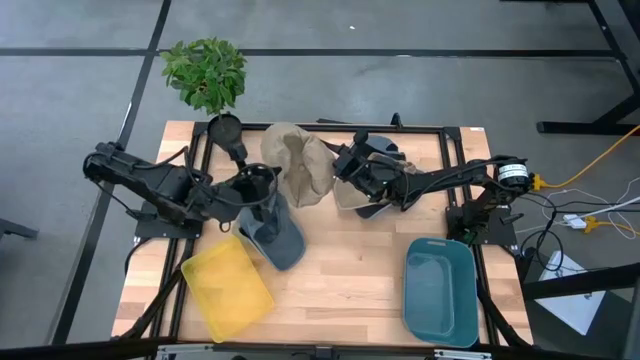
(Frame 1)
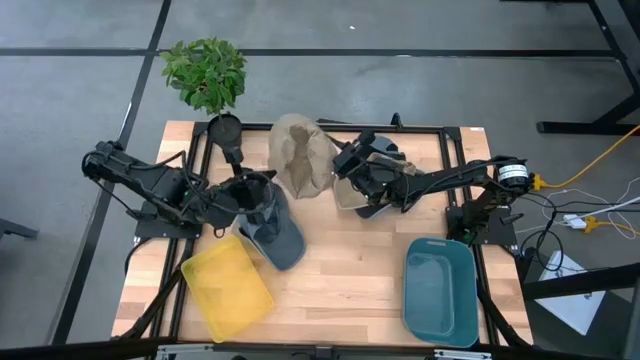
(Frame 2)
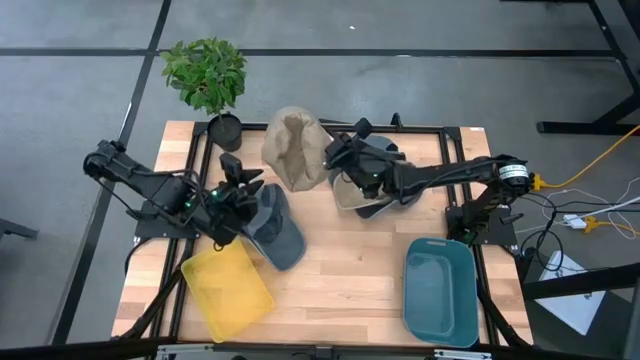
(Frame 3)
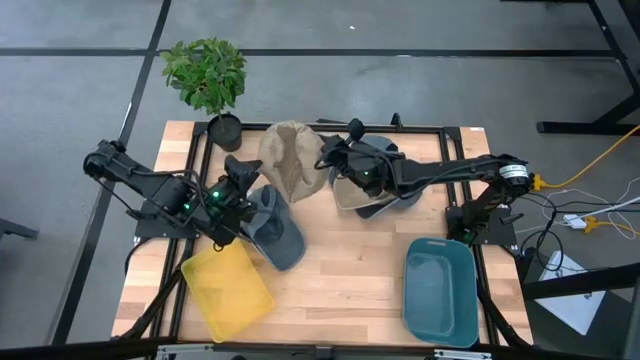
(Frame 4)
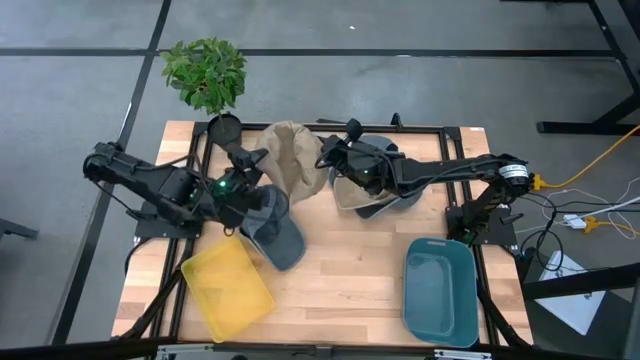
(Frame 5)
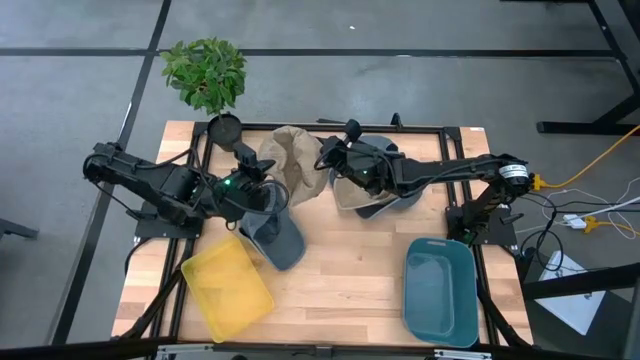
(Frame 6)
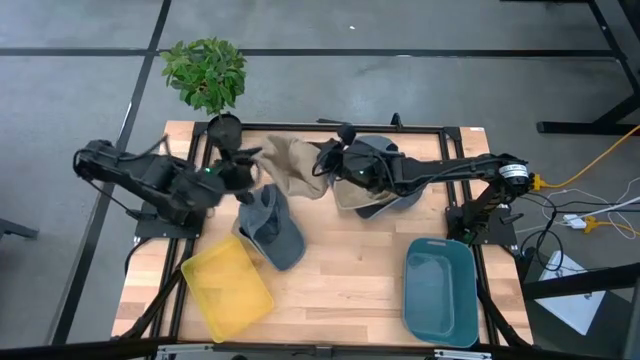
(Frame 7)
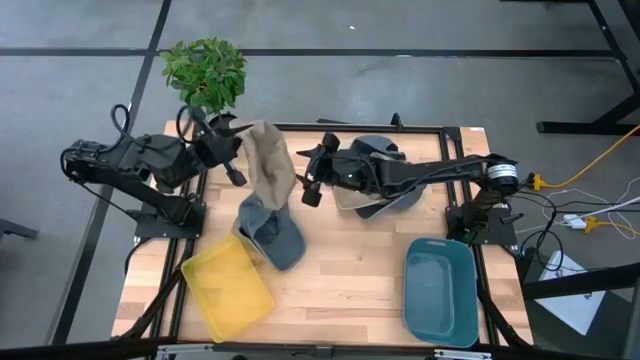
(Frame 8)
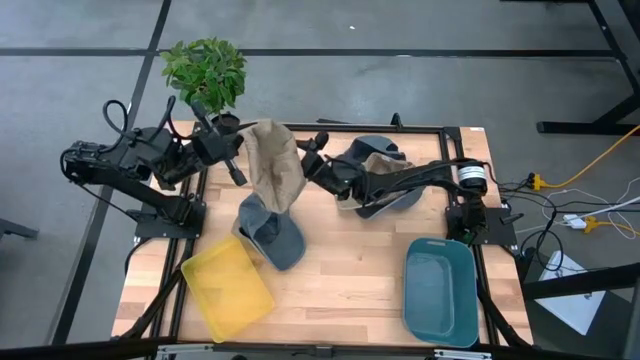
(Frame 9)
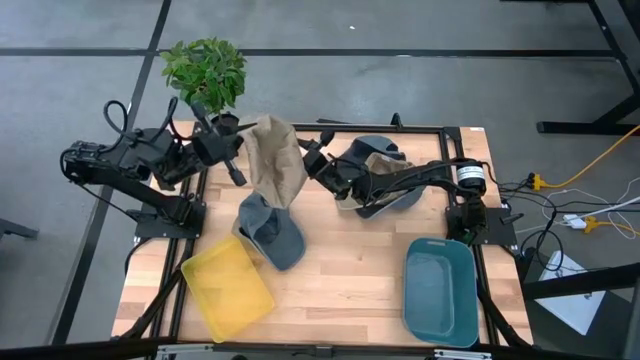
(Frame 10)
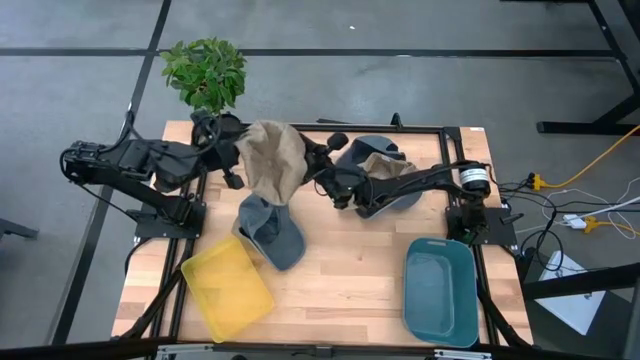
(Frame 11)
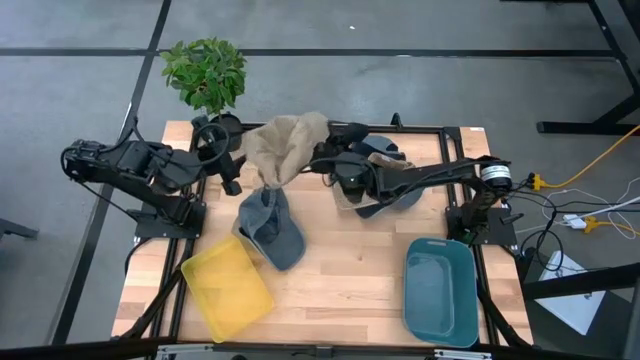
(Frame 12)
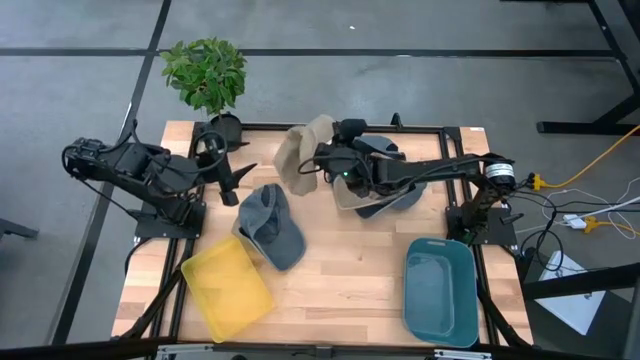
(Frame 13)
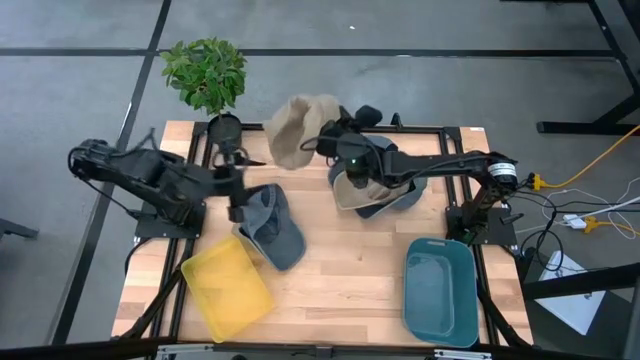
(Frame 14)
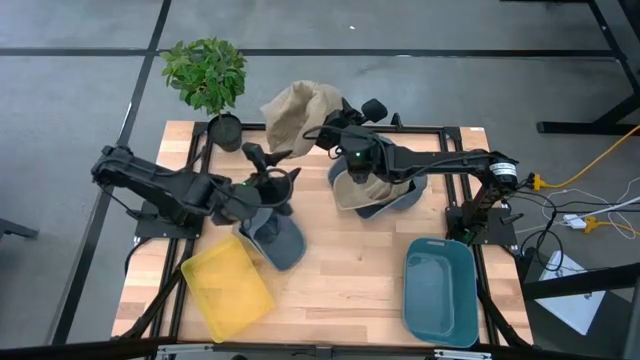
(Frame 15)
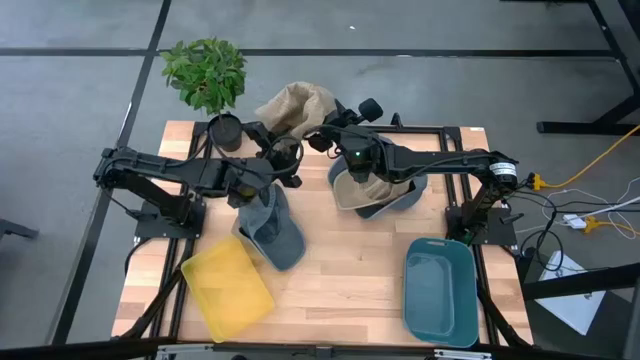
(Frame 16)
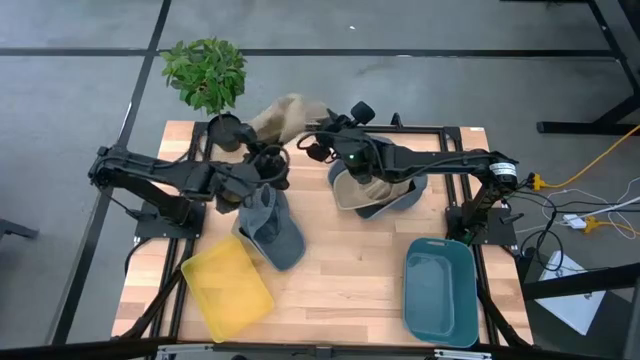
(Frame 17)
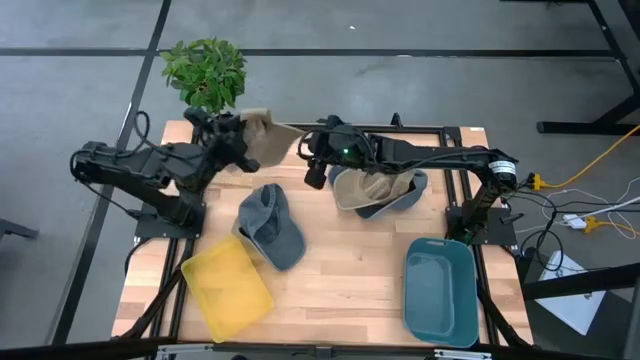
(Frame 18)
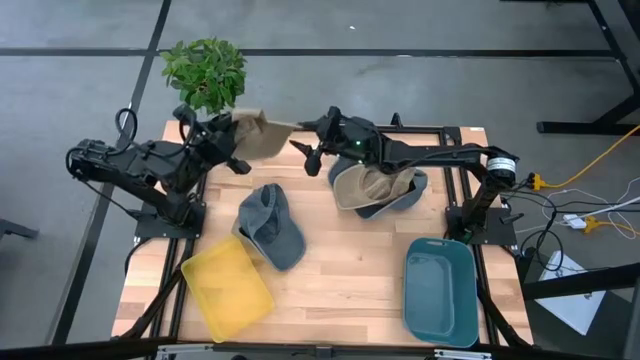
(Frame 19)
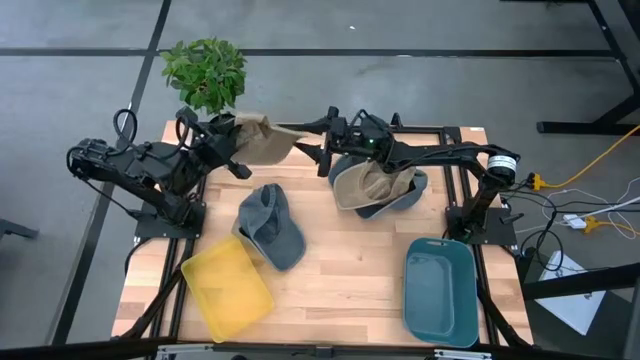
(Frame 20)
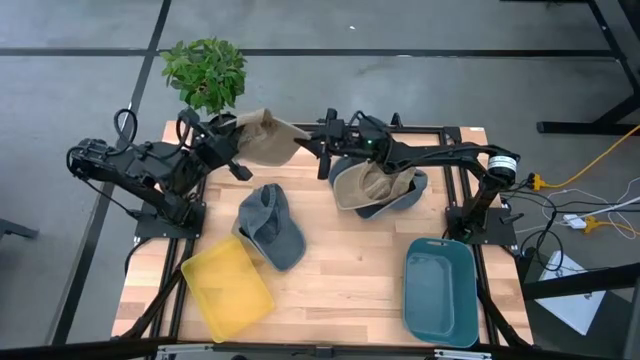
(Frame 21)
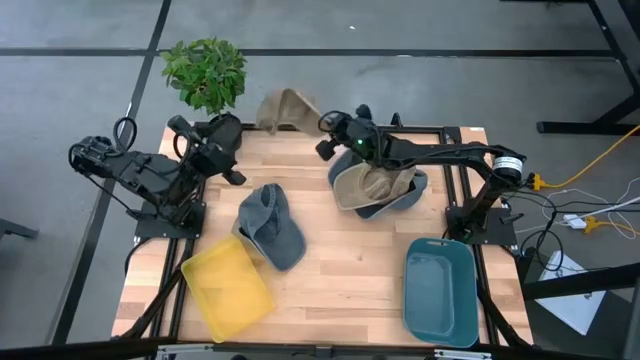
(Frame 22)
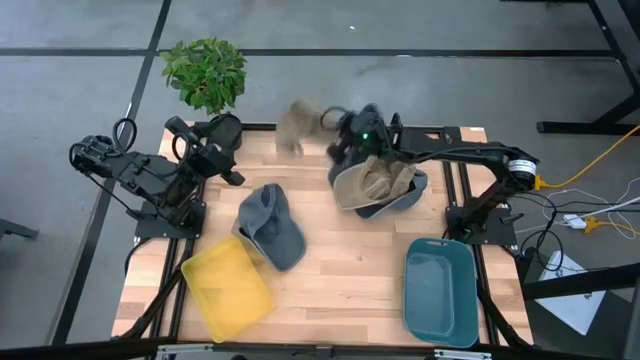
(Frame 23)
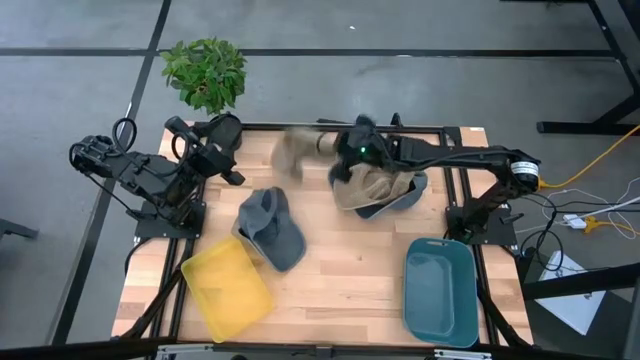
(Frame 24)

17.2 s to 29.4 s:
Task: Pick & Place hat
Put the middle brown cap into the blue bin

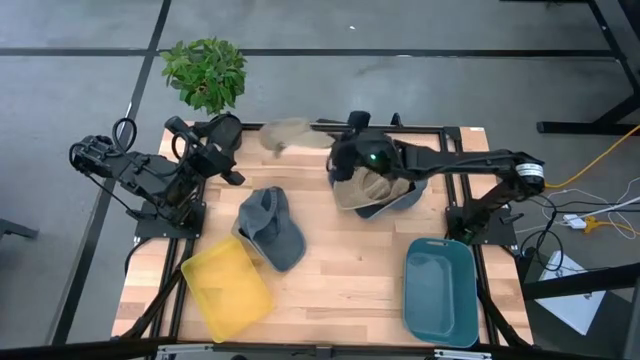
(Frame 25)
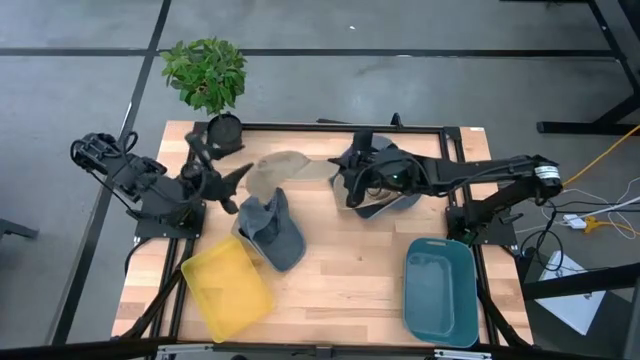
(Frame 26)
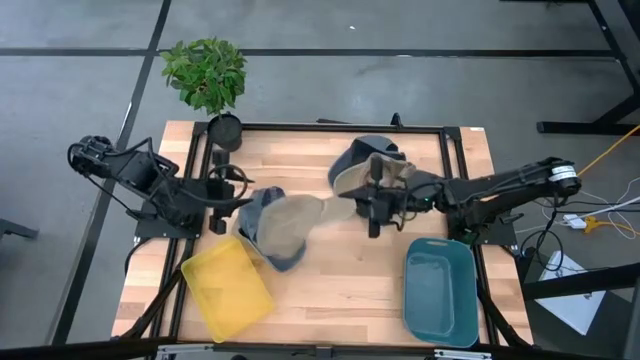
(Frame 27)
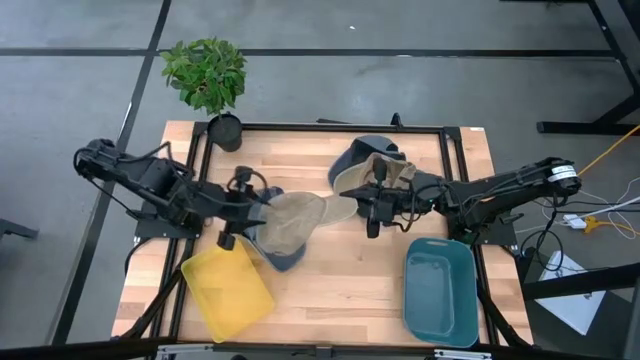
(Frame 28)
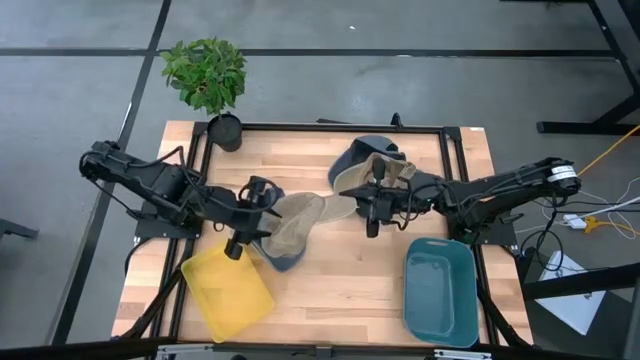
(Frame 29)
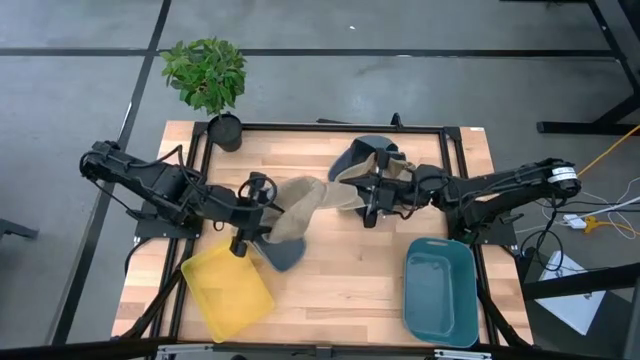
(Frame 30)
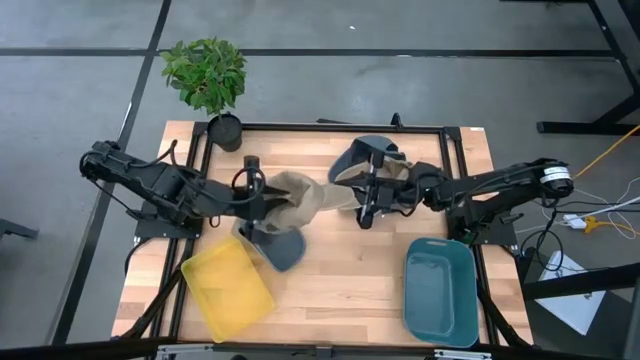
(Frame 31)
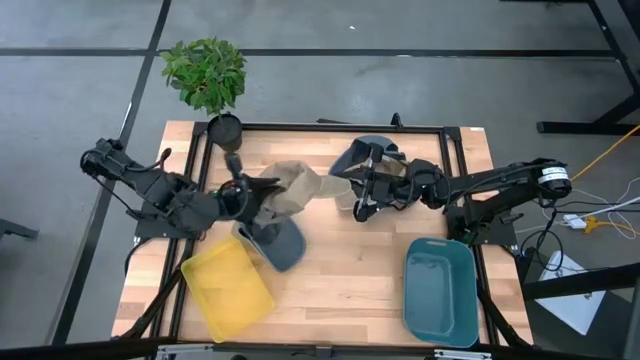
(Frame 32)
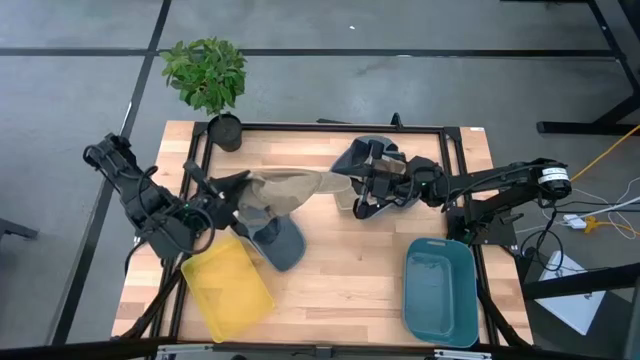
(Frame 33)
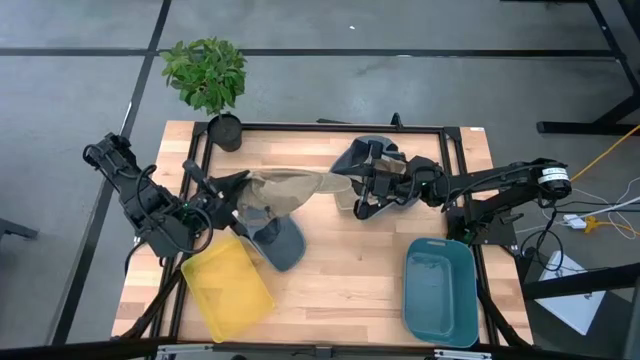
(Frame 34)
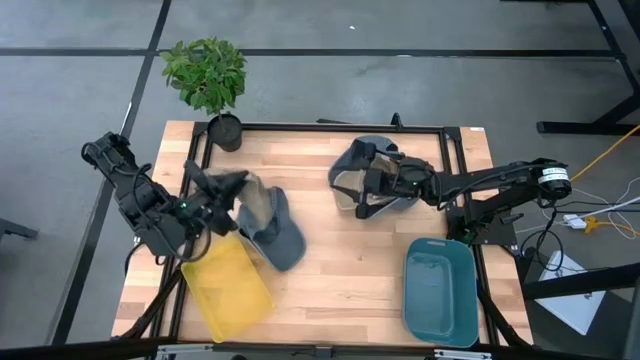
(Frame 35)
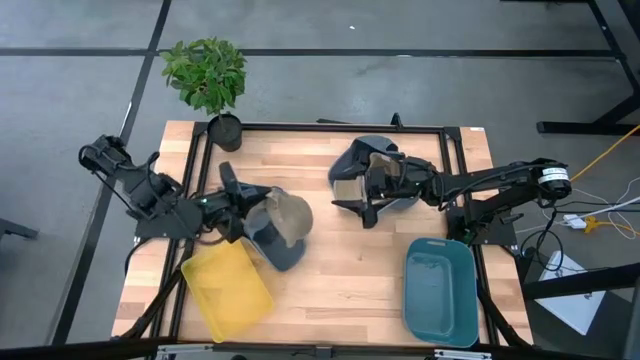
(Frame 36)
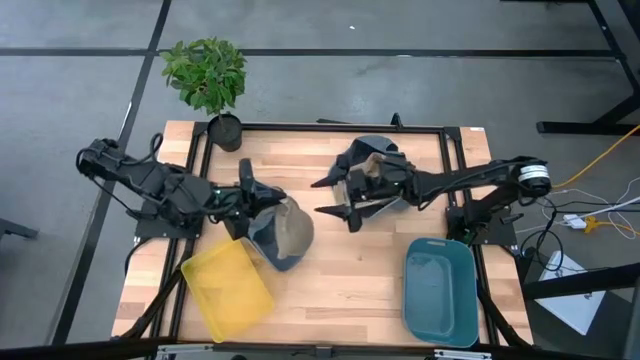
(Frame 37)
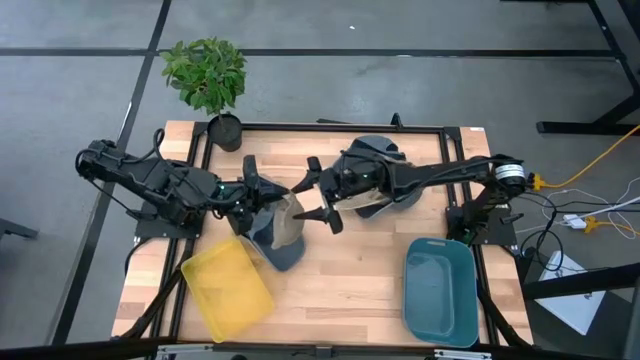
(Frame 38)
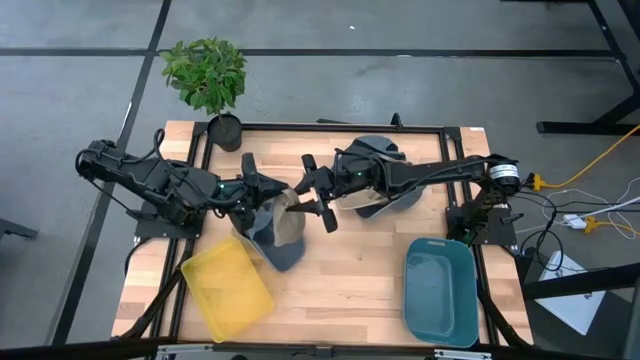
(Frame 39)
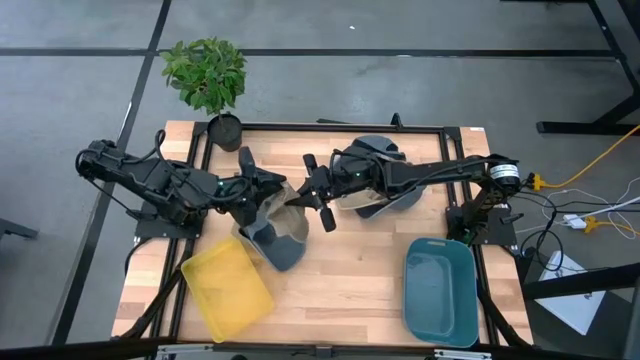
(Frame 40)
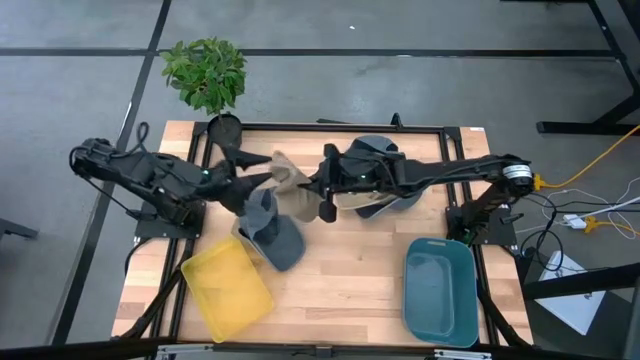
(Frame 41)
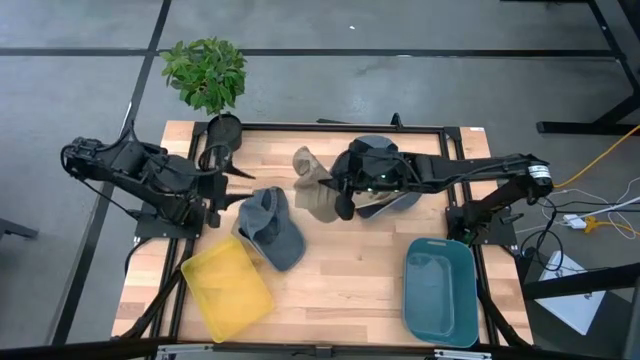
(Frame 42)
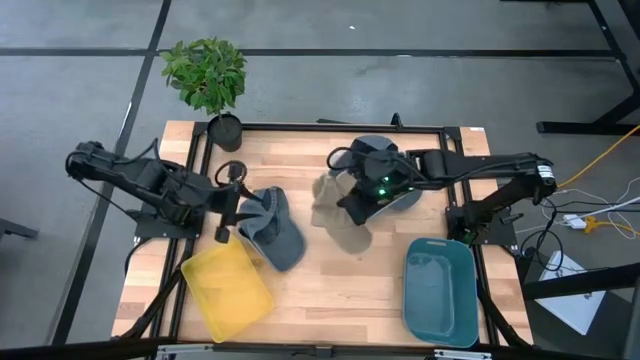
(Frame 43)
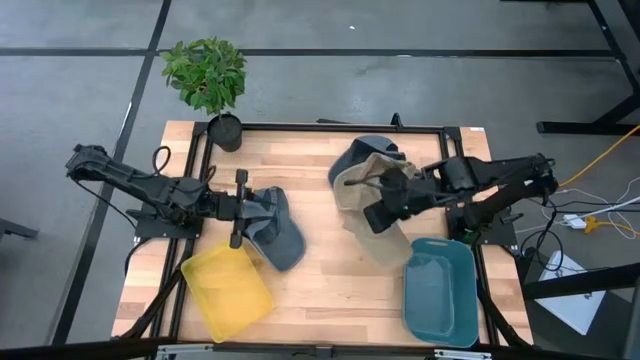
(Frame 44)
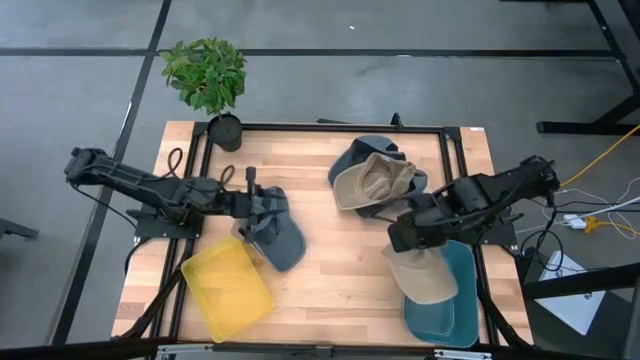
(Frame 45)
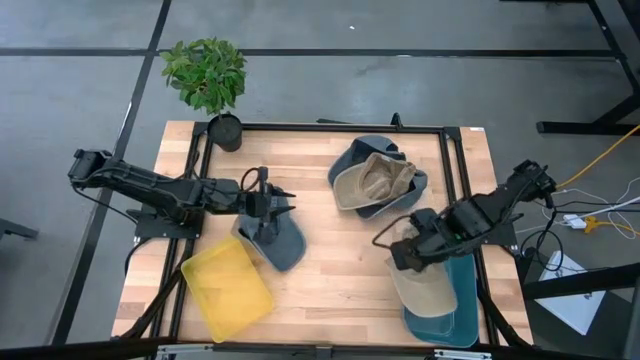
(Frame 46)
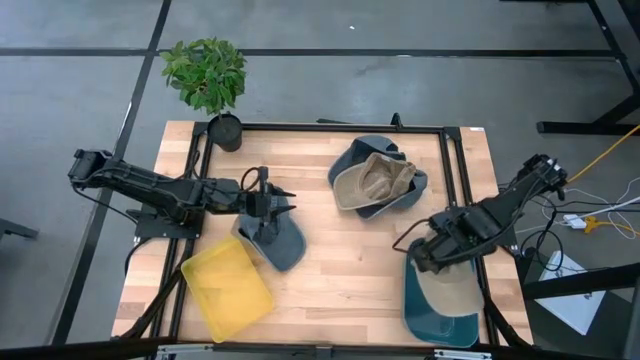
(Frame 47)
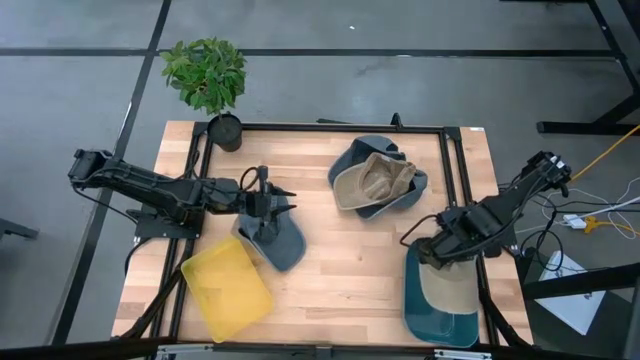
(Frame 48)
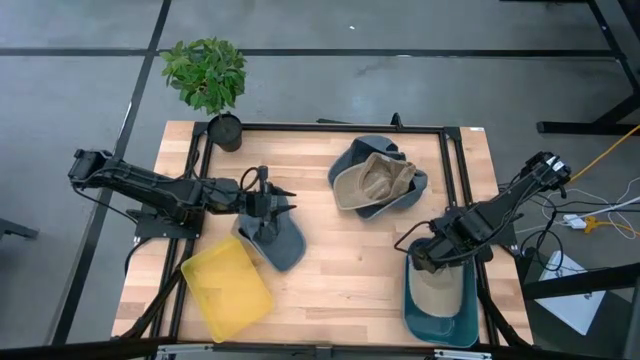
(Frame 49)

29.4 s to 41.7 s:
Put the middle brown cap into the blue bin
